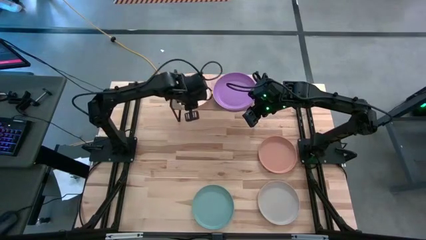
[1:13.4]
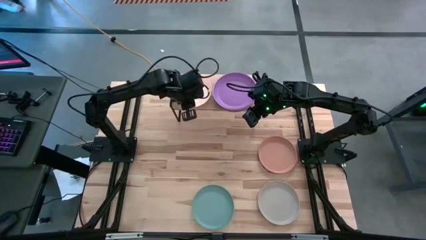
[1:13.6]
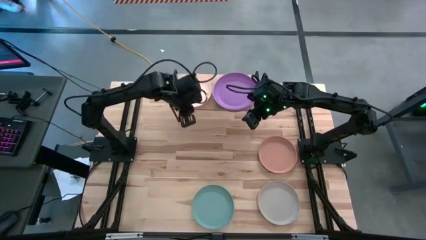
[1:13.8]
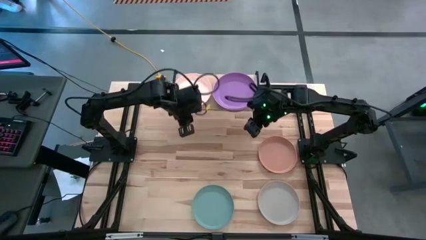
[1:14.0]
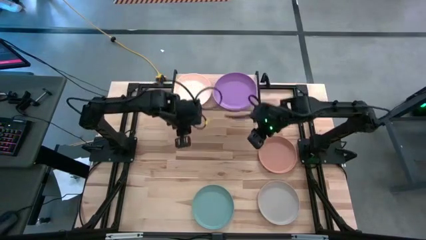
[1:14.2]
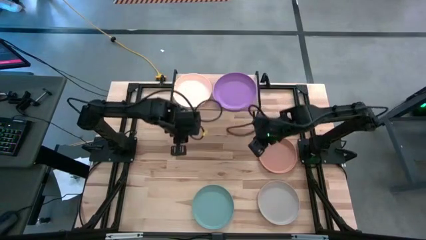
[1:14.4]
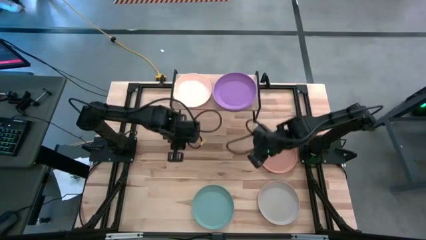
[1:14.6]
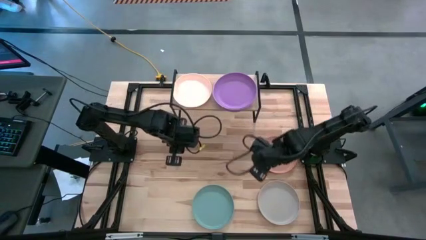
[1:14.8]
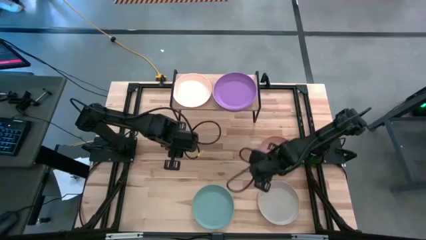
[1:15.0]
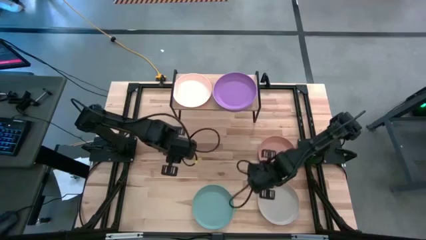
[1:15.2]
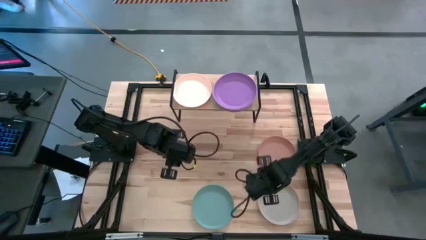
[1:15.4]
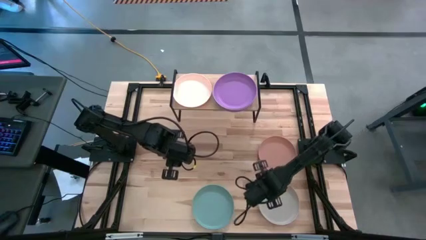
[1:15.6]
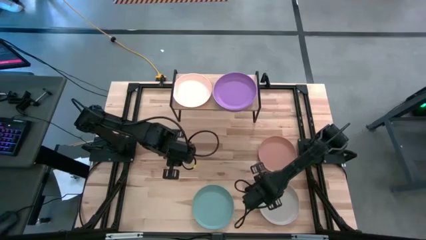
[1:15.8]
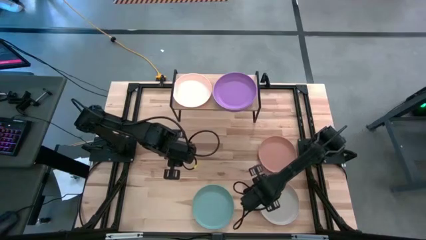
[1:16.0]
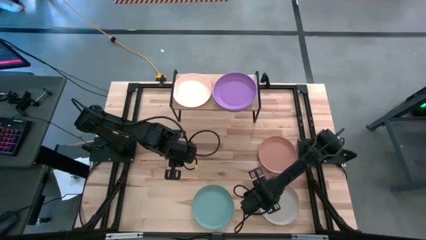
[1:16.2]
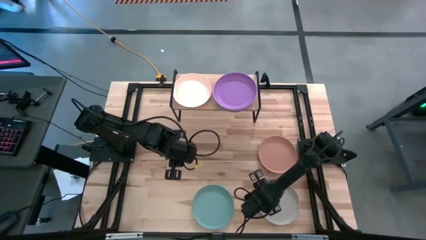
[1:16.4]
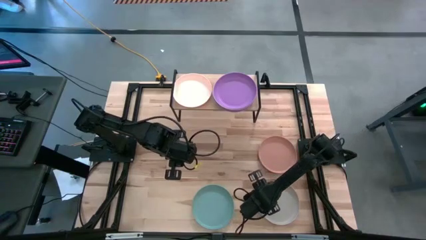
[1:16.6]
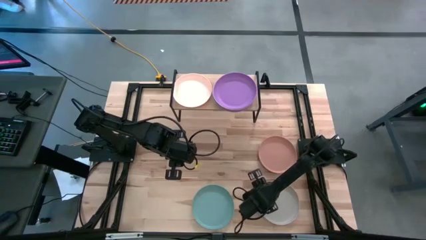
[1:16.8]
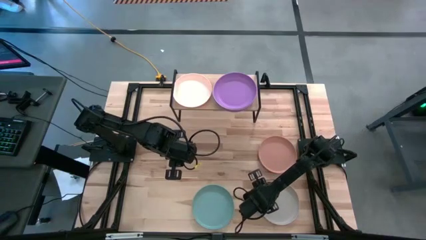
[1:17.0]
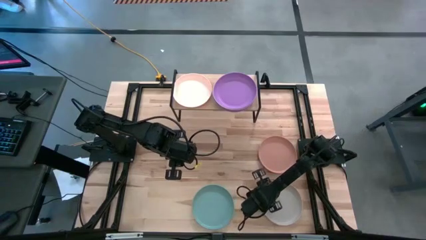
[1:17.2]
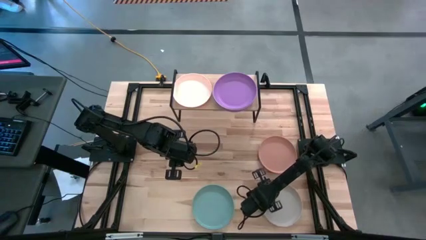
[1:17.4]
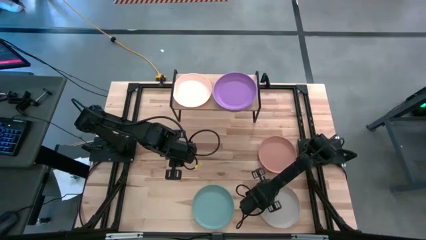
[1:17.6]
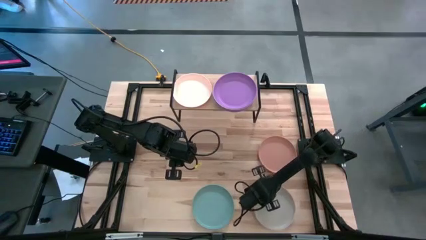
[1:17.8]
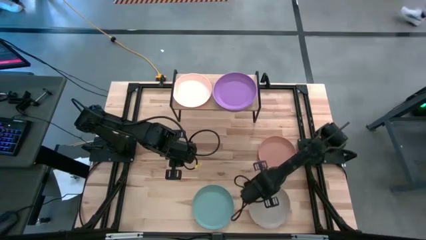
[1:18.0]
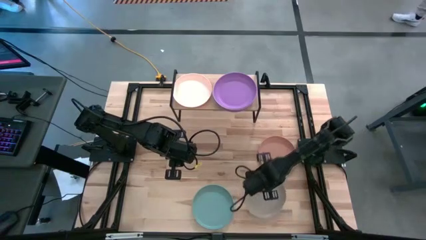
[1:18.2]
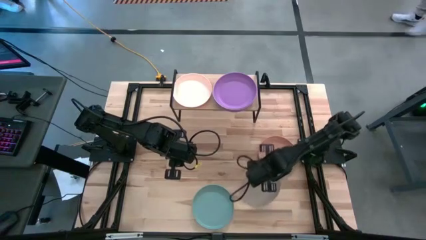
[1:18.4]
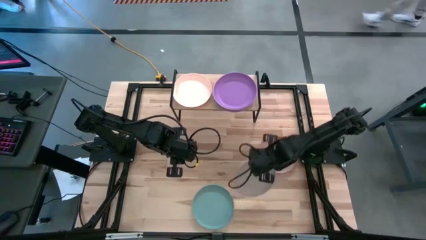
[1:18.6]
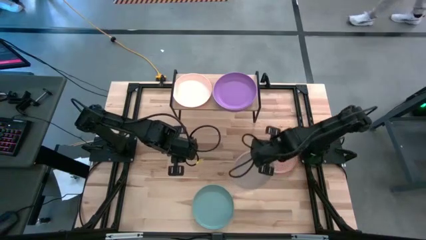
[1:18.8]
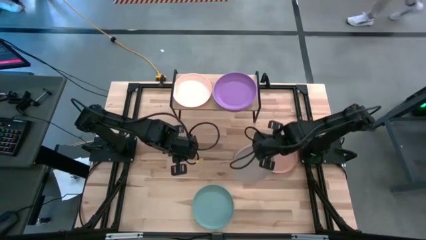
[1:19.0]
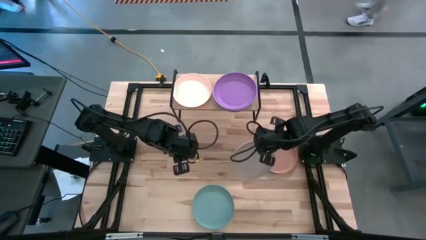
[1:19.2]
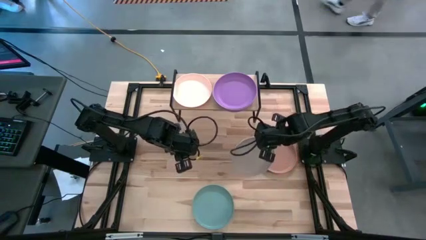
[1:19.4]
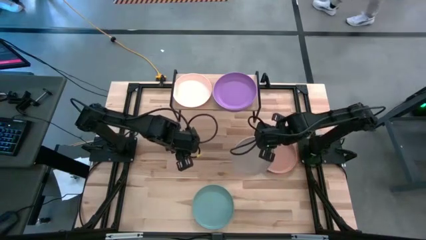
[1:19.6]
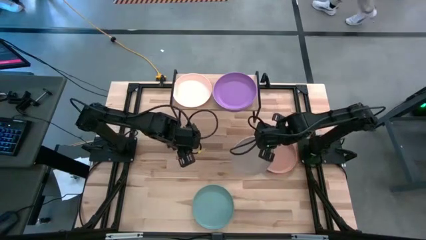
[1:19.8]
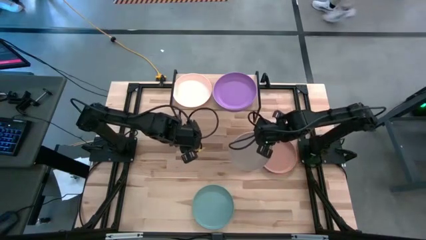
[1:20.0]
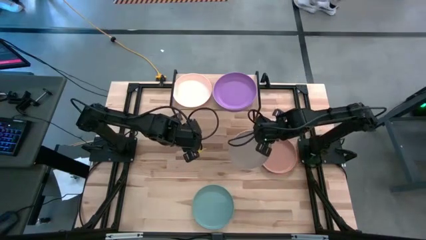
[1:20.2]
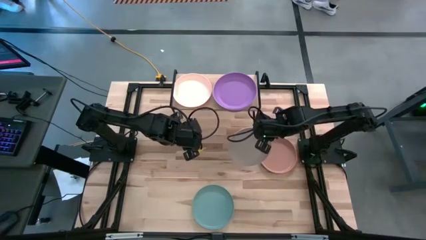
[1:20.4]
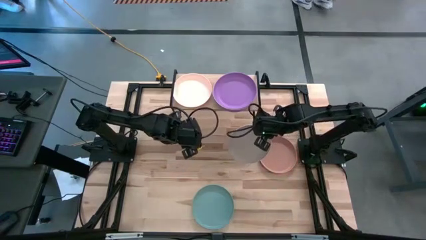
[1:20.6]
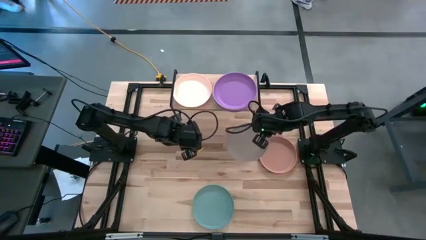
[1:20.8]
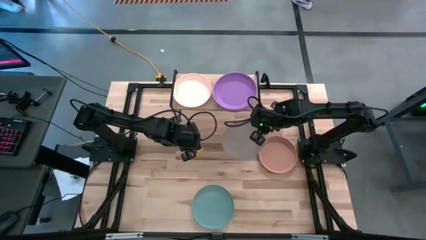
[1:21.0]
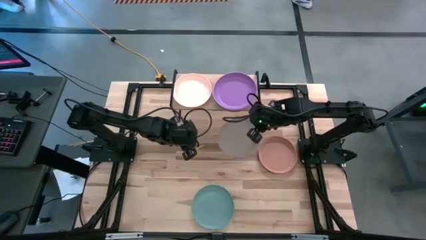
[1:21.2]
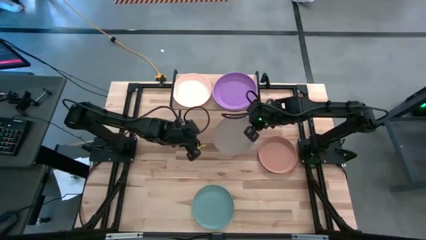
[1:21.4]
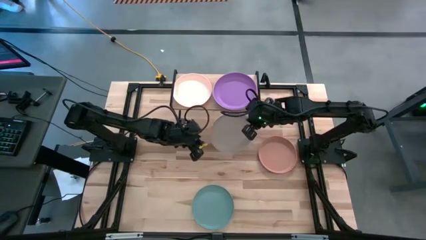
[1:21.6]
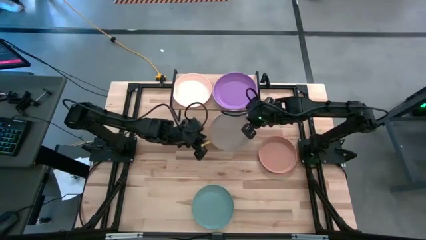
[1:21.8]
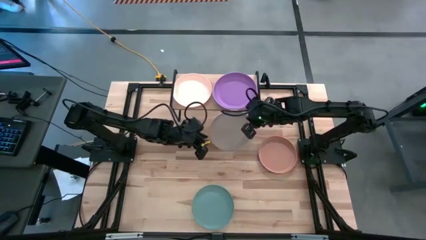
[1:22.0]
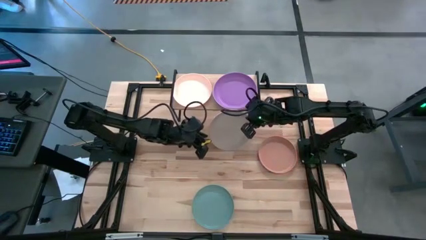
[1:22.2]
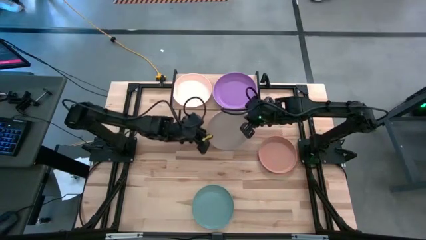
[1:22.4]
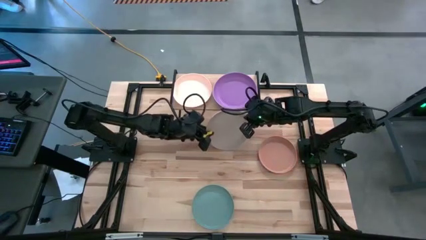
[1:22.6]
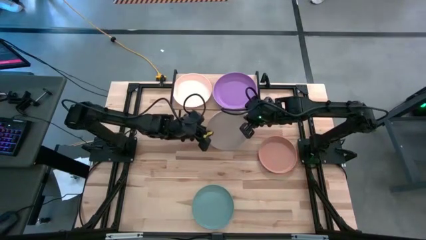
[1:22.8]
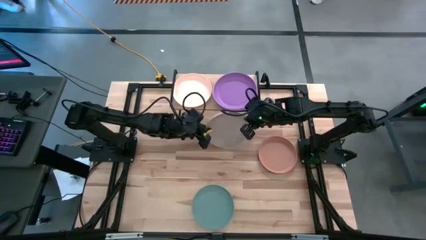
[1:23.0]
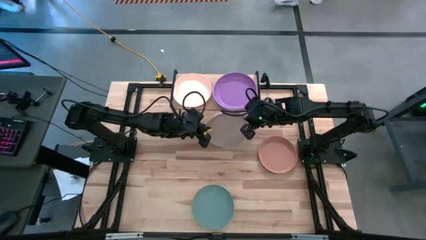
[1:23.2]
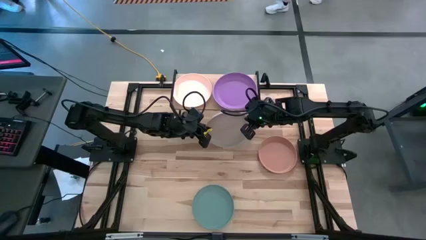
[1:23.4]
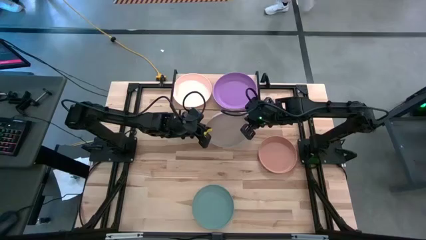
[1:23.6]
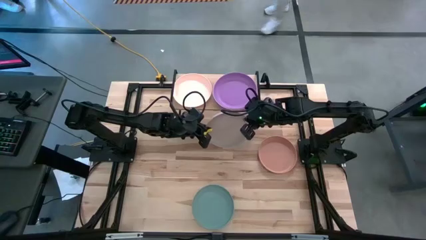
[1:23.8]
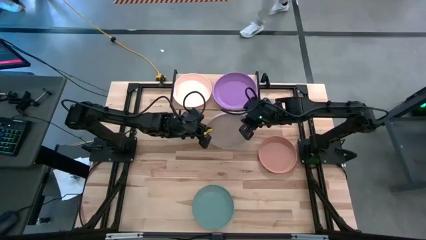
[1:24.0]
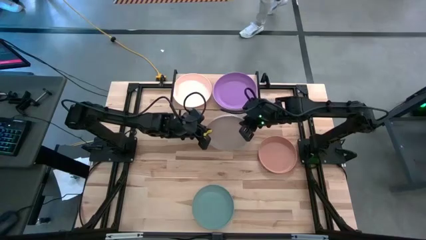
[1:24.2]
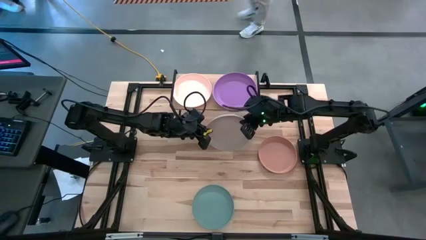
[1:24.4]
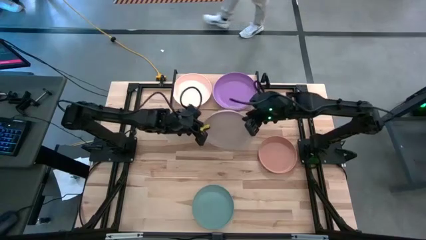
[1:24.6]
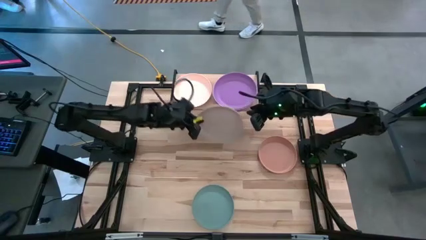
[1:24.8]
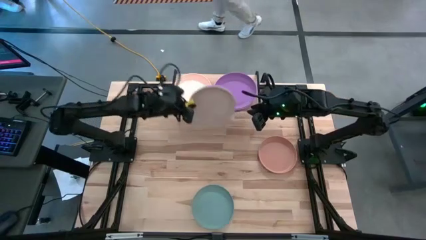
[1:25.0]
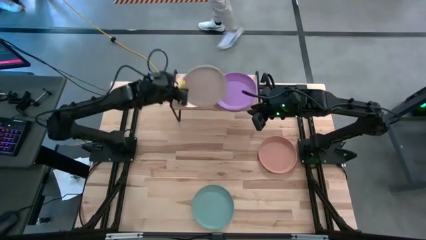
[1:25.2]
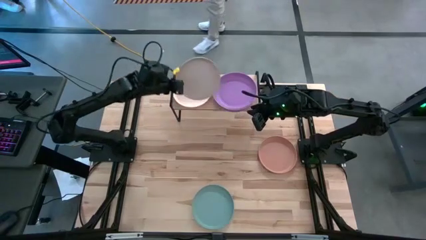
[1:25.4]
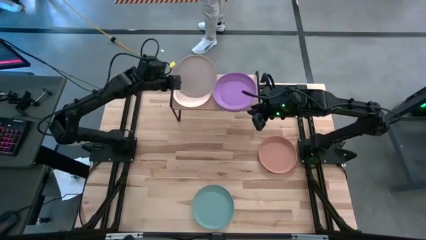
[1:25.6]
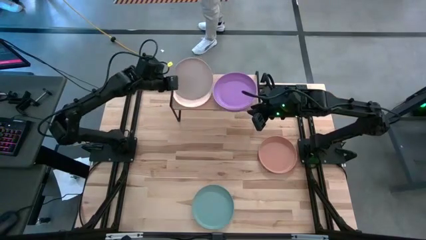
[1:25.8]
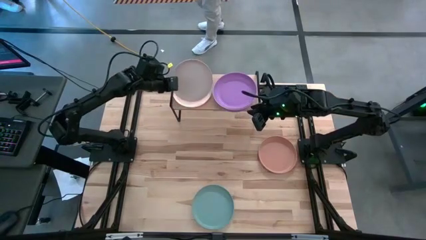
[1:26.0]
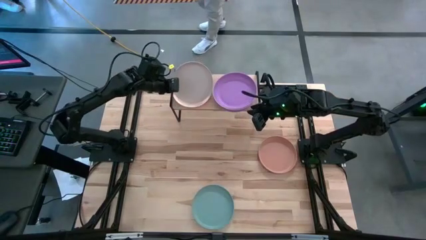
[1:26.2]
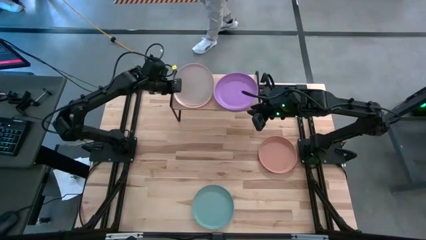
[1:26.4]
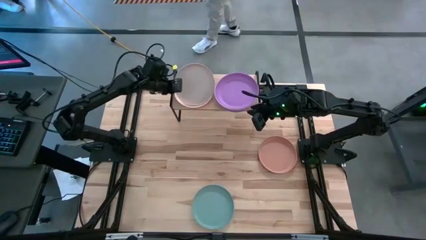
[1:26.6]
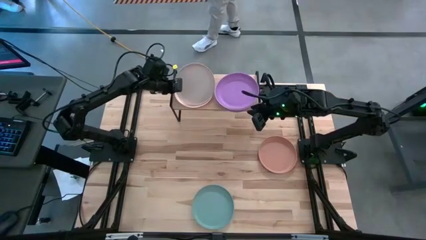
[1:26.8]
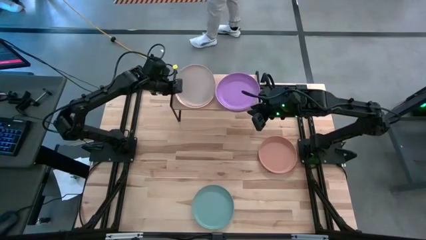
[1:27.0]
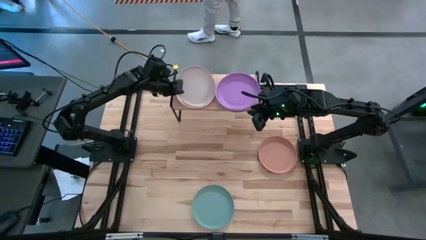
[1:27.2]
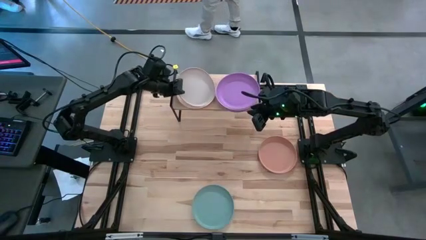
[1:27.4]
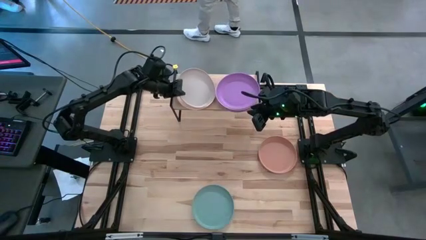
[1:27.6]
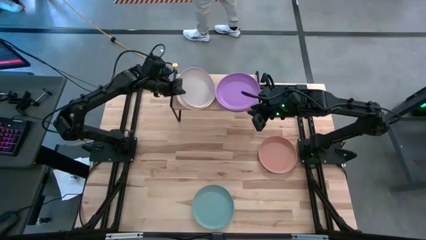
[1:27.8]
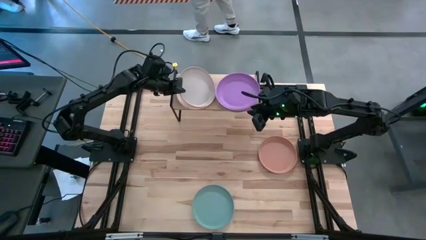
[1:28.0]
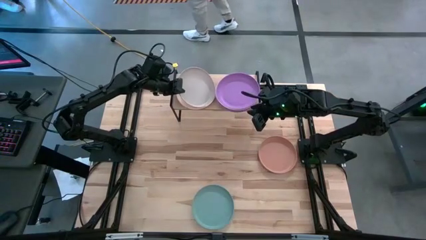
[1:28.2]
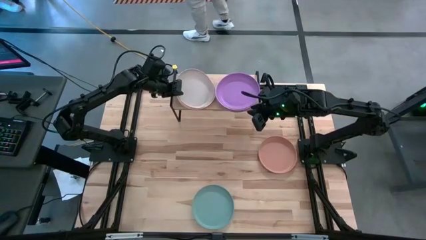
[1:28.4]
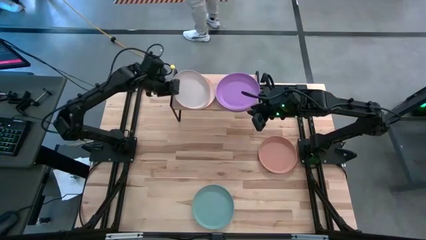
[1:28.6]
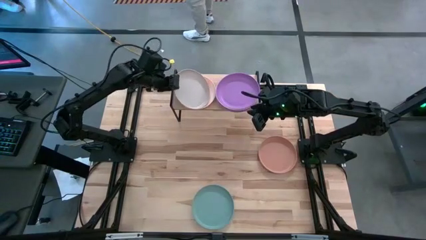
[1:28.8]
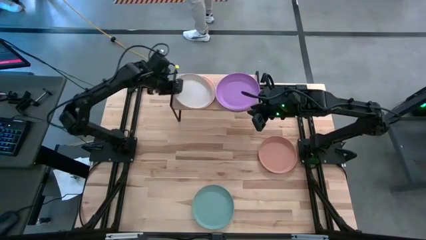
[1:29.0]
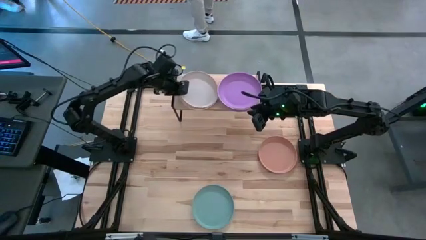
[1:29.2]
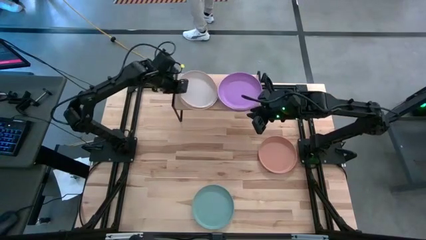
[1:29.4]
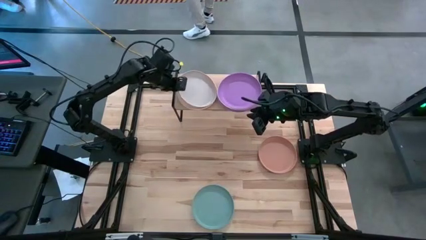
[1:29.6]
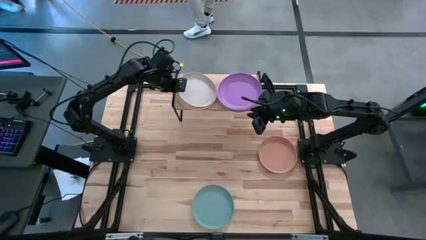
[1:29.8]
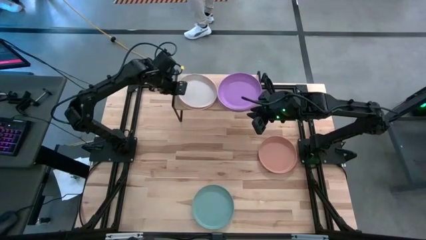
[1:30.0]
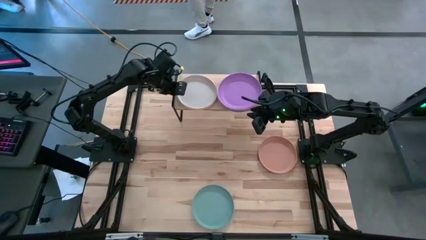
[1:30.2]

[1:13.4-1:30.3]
Task: Place and stack plates onto a shelf
Stack the white plate on top of the light brown plate on the shelf
